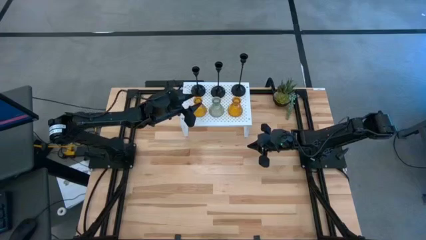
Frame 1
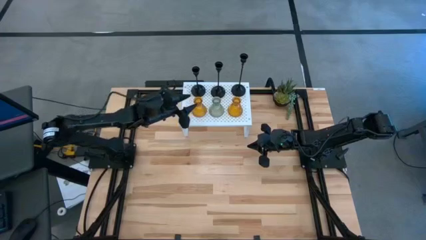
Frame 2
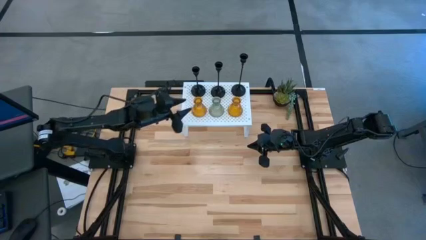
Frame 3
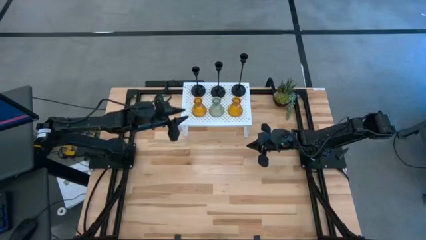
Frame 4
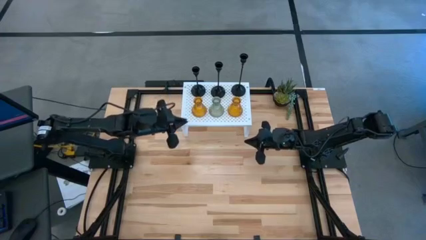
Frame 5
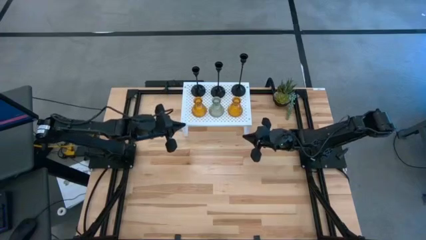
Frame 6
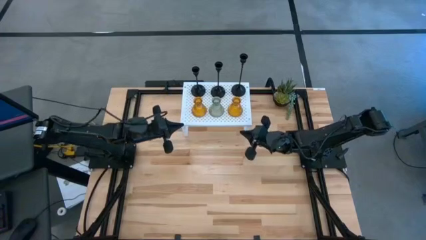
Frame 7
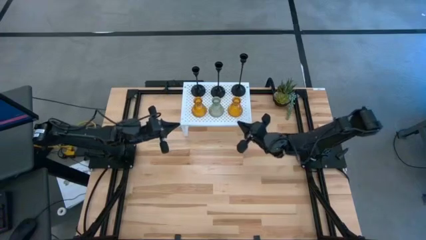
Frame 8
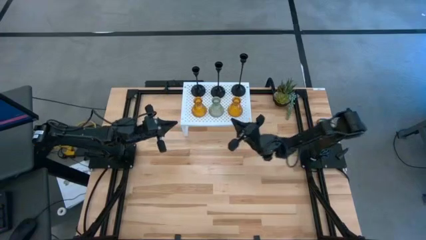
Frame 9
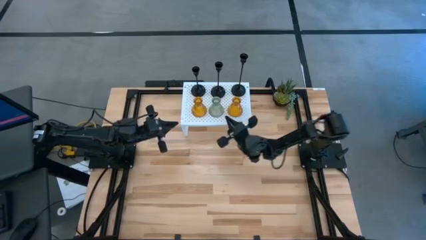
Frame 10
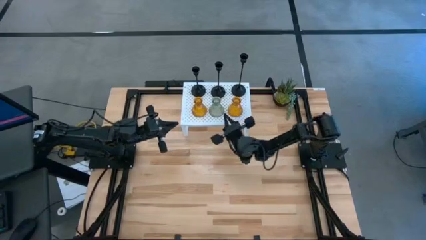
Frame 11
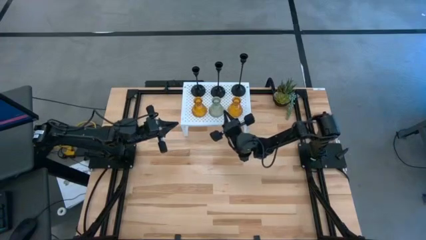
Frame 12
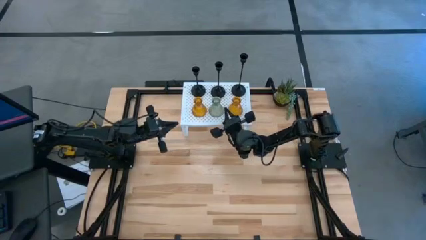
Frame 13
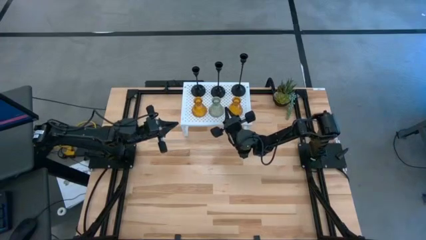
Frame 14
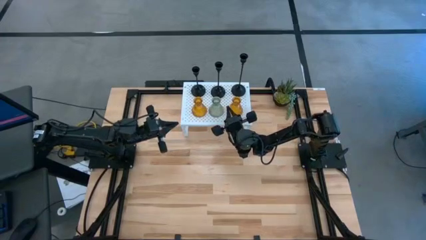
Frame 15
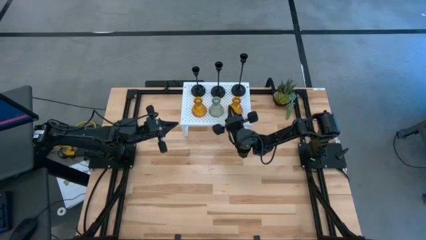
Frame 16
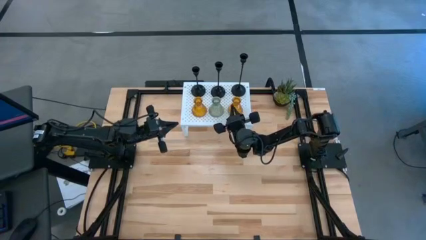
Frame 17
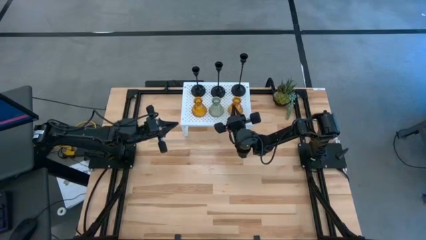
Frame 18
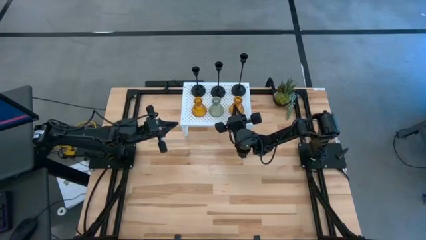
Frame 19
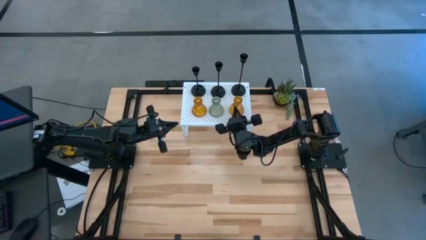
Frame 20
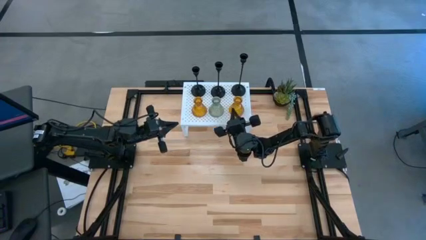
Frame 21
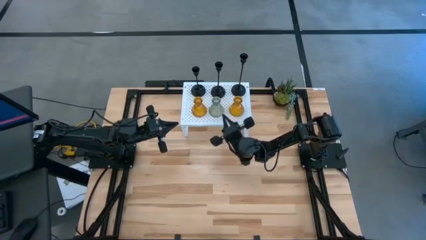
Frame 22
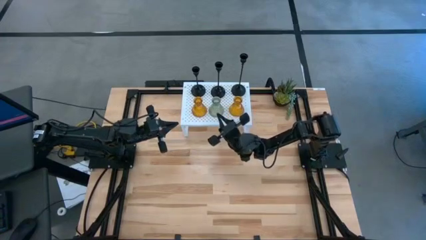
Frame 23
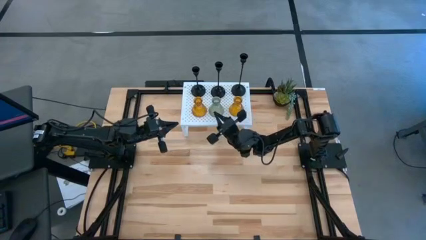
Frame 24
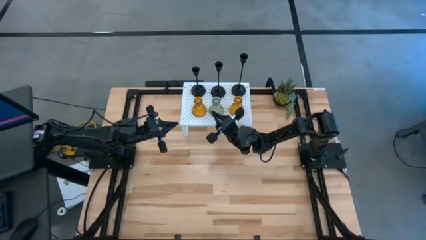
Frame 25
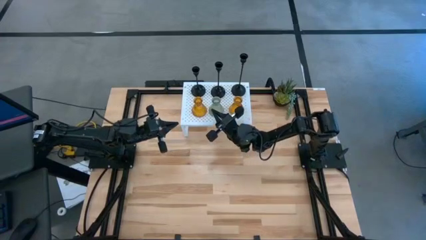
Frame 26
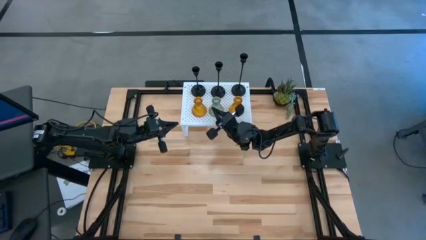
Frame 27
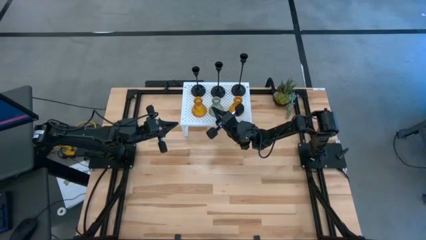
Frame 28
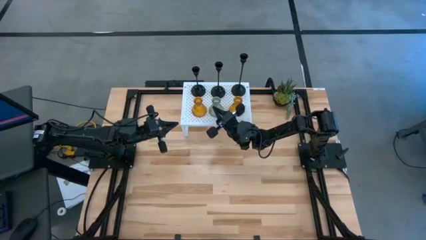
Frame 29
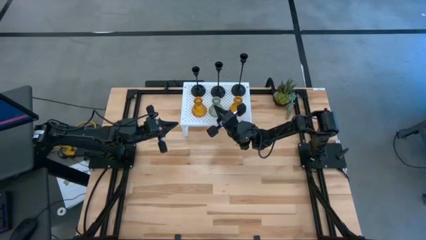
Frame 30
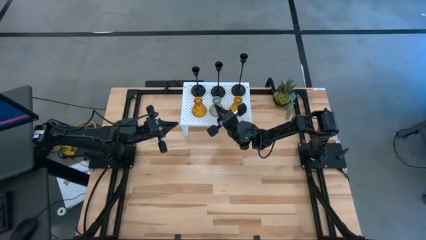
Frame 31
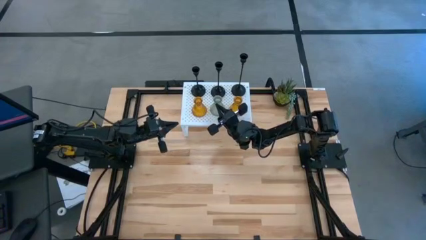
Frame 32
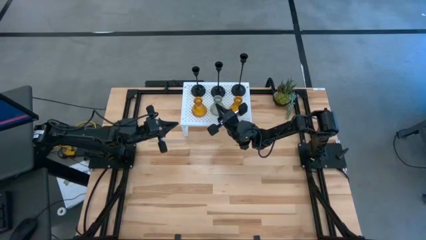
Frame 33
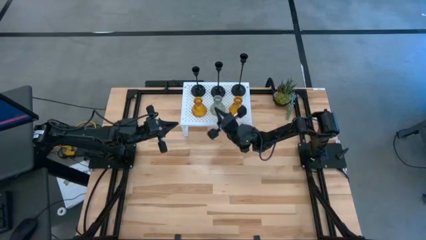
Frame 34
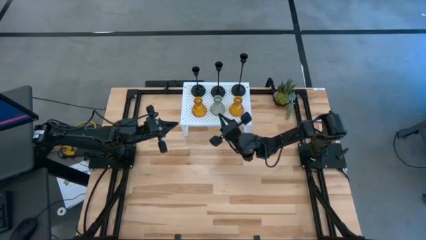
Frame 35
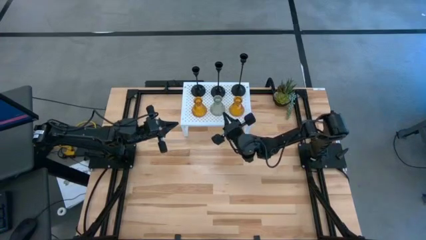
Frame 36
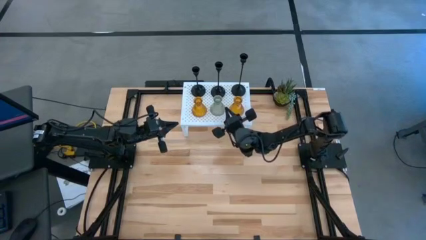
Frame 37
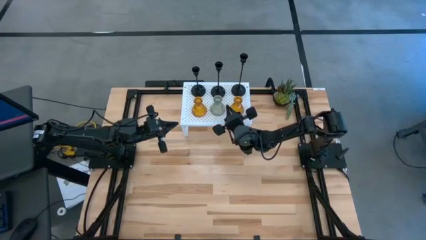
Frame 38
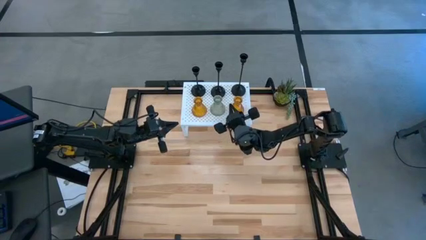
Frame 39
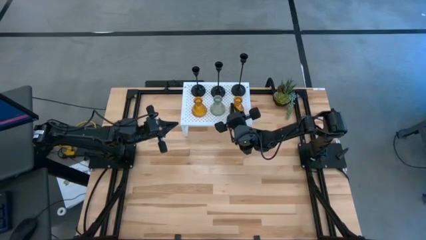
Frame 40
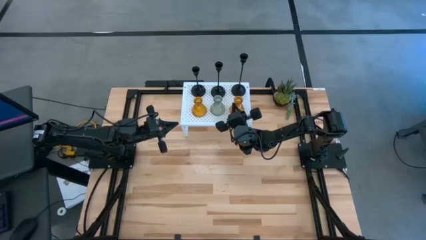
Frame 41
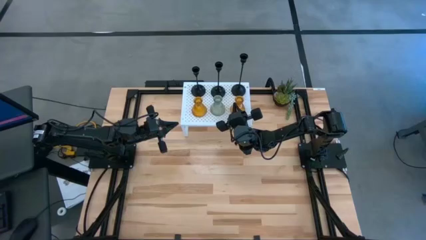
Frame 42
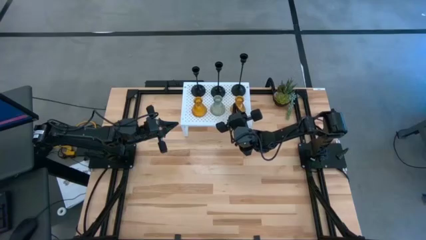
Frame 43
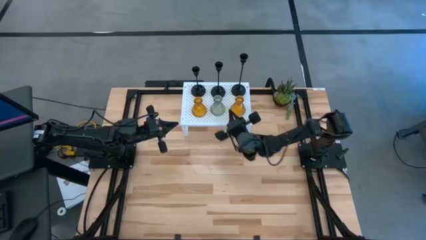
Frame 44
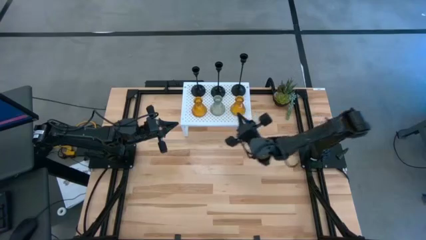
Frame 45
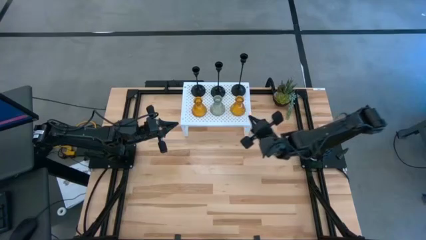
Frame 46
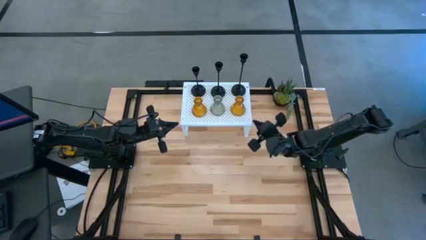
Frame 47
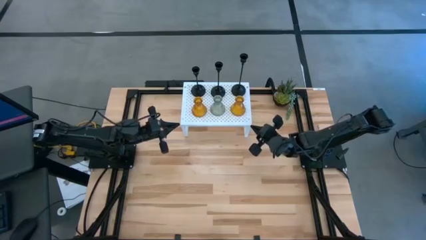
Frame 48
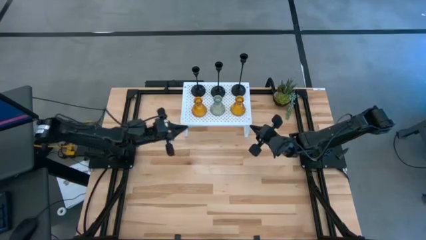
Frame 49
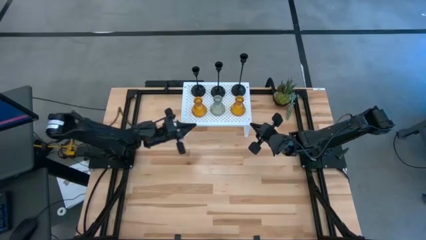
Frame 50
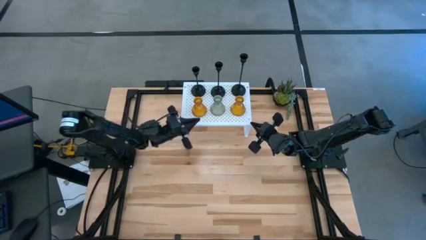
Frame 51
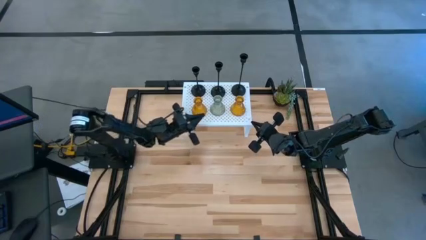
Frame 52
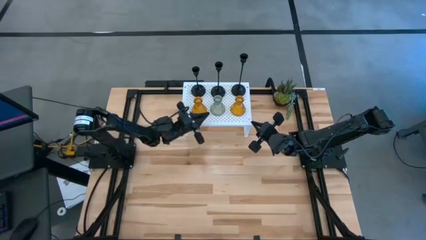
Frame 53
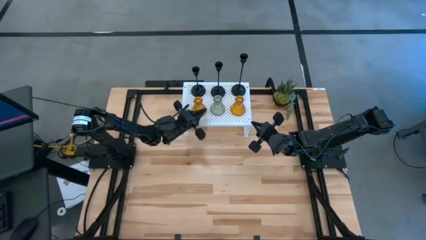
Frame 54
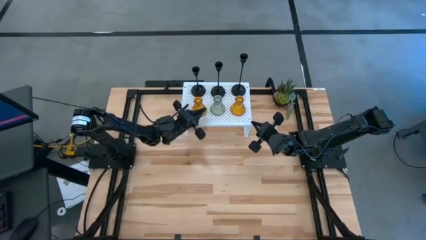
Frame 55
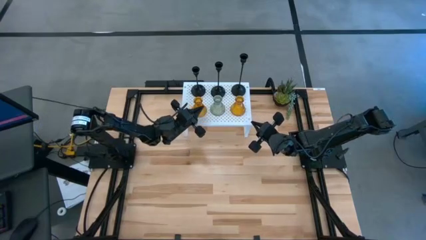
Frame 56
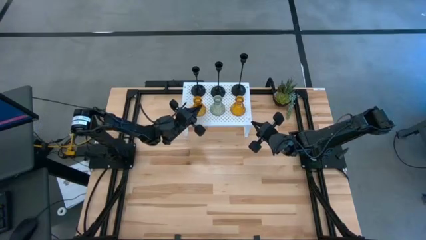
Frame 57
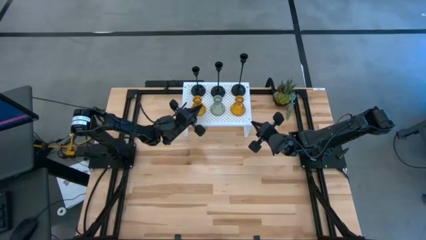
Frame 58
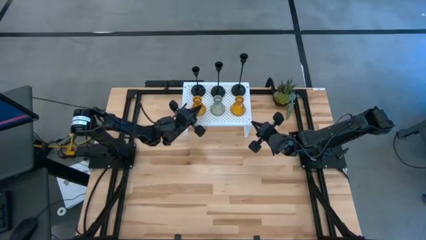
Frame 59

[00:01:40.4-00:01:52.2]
Task: Pick & Place candle stick holders
Adjust the glass candle holders on the shelf

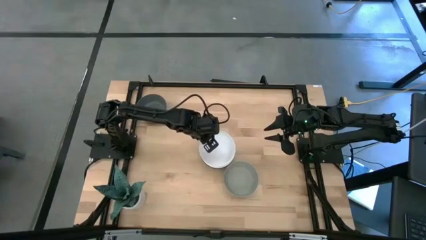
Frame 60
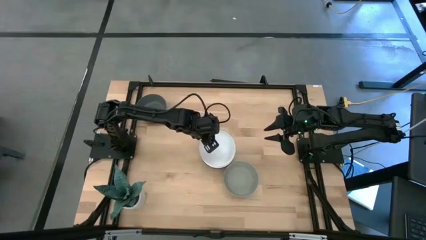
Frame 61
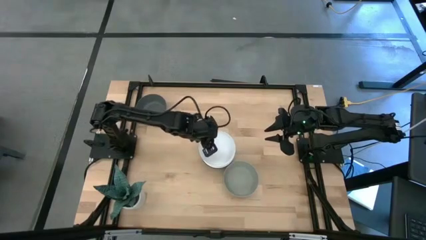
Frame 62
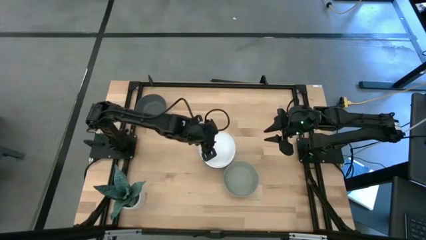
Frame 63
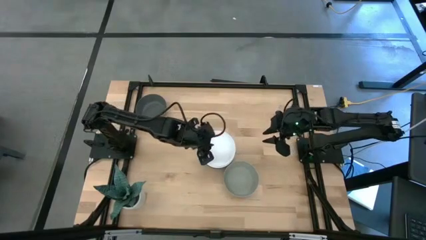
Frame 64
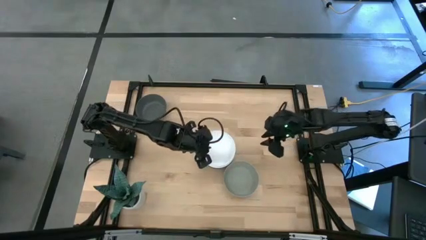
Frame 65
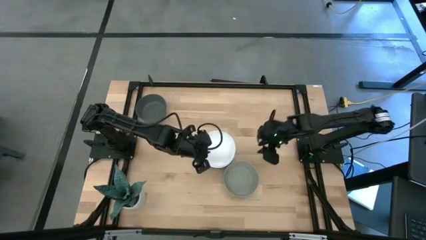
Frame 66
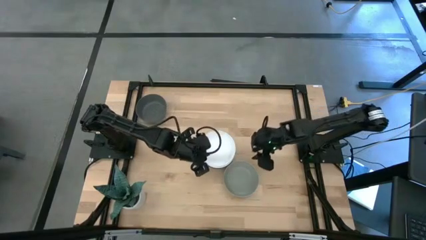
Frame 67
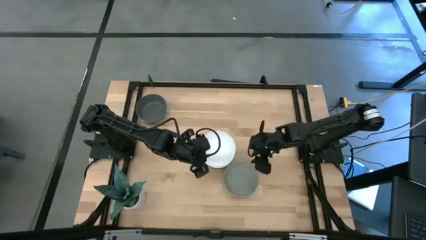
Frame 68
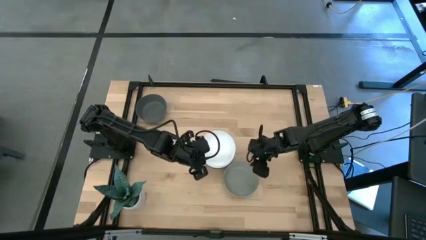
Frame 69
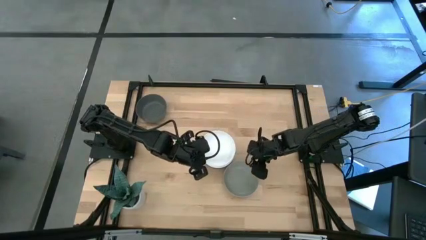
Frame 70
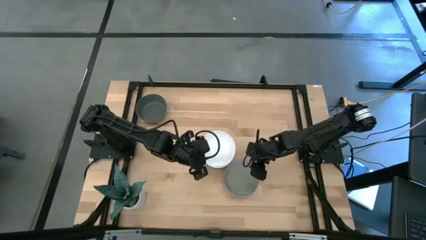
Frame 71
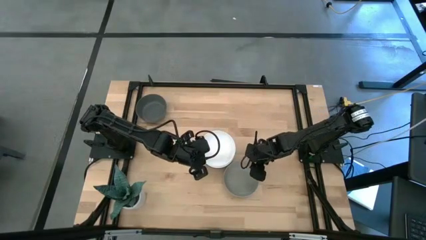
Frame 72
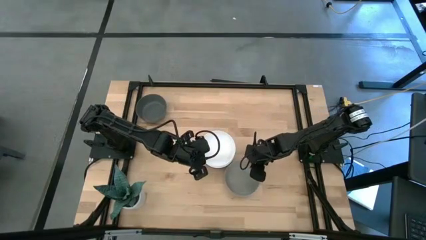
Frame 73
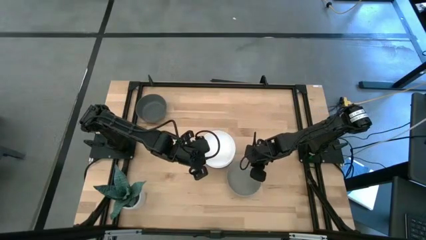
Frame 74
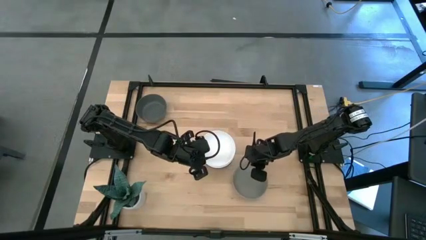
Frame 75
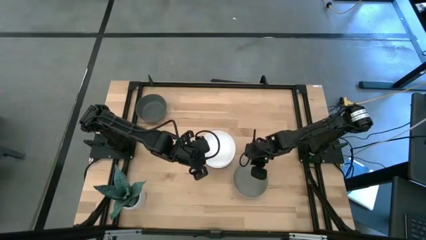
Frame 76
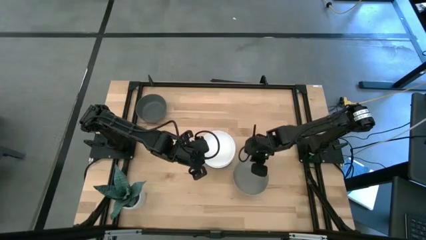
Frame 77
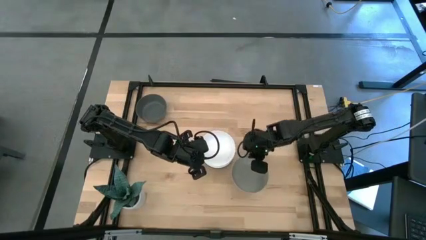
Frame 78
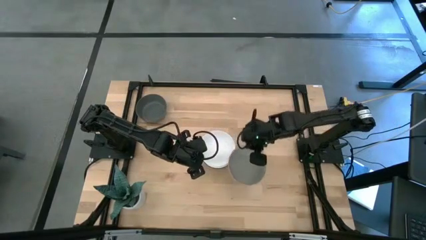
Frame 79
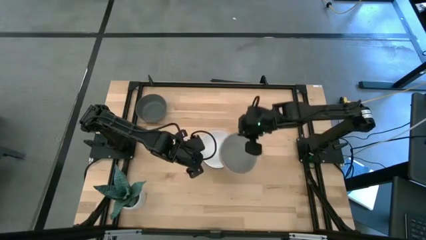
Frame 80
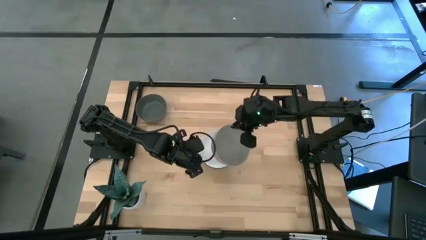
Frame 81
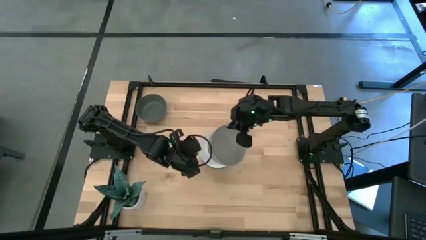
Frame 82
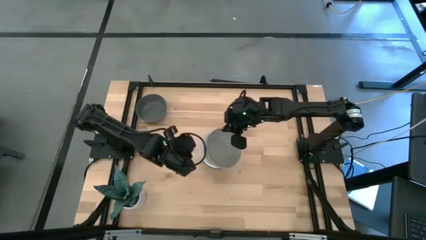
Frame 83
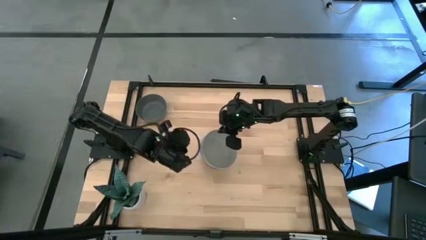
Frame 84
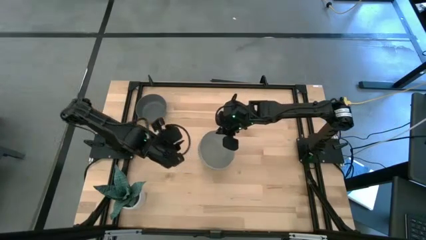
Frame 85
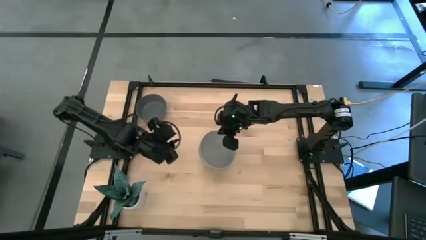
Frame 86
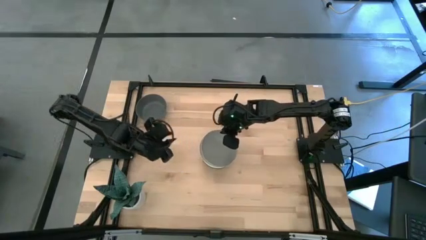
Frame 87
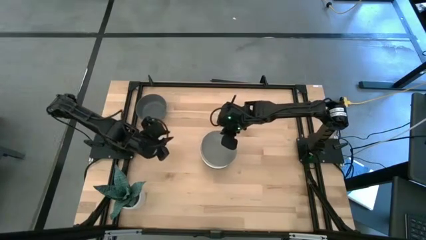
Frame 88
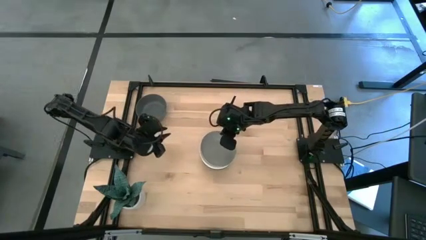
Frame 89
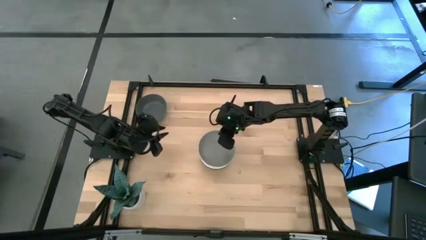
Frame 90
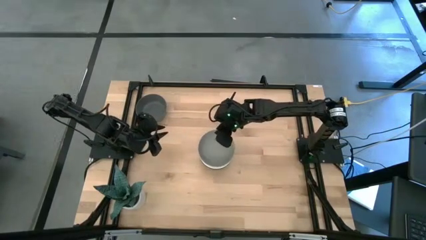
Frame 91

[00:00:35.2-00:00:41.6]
Task: Nest bowls inside each other
Stack the light gray bowl on top of the white bowl
